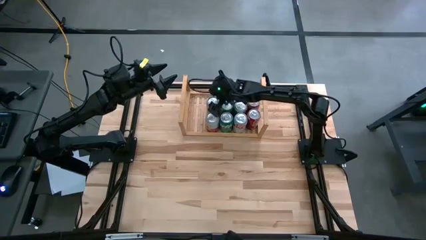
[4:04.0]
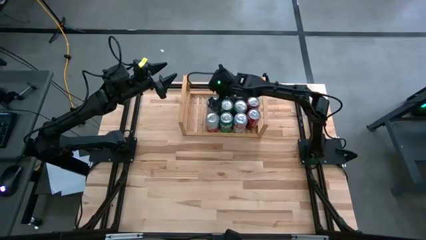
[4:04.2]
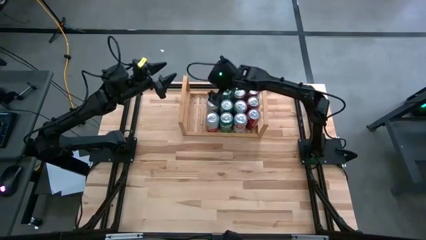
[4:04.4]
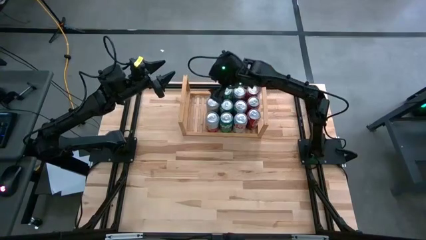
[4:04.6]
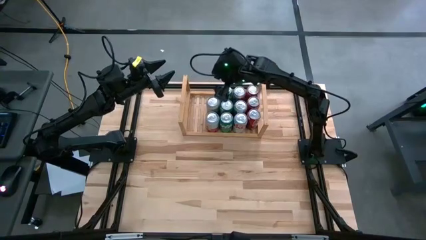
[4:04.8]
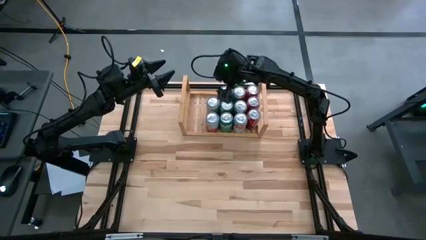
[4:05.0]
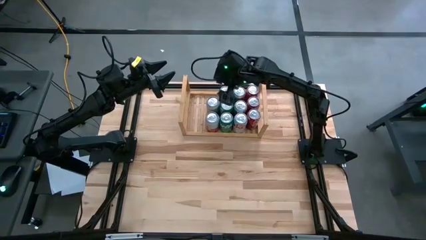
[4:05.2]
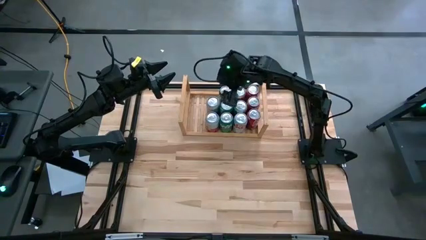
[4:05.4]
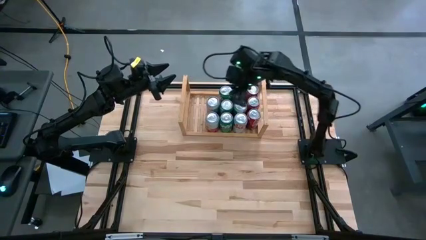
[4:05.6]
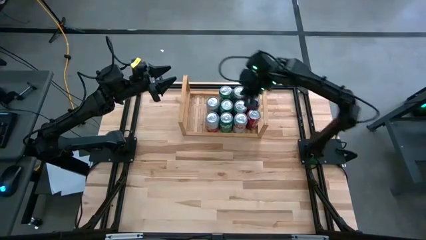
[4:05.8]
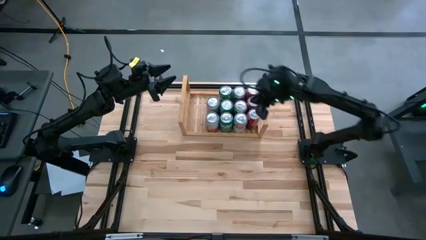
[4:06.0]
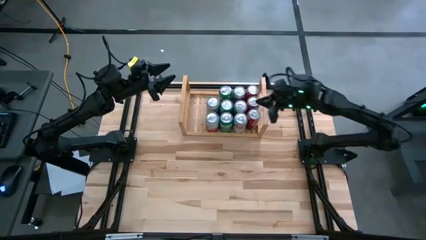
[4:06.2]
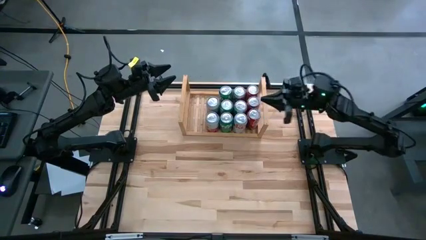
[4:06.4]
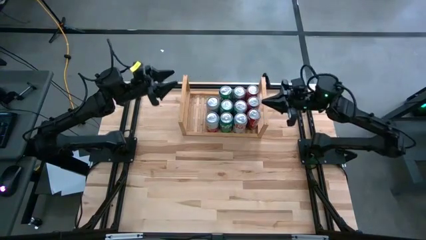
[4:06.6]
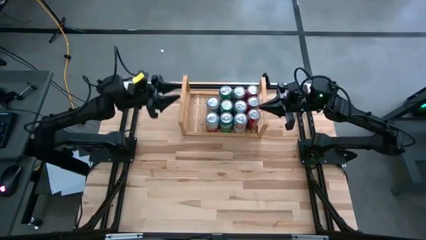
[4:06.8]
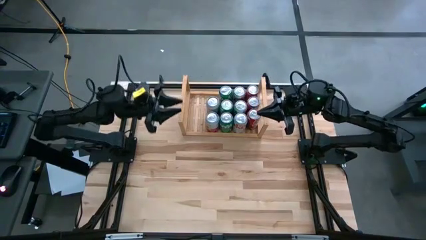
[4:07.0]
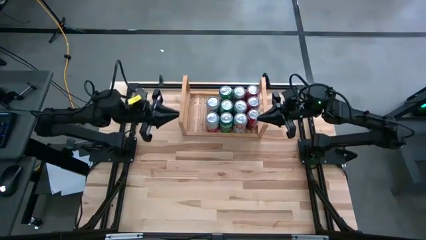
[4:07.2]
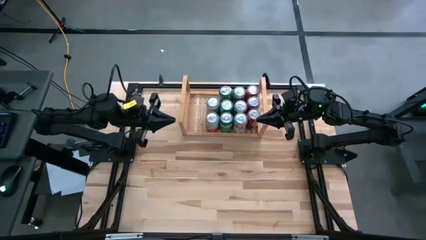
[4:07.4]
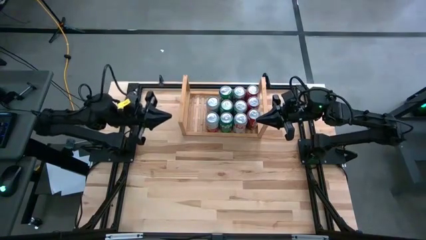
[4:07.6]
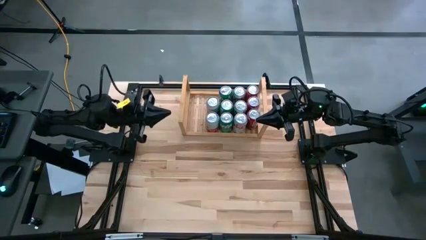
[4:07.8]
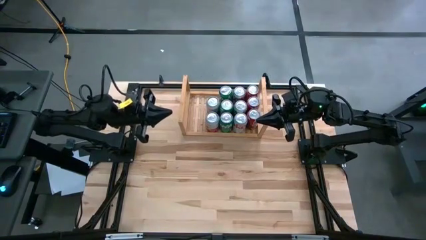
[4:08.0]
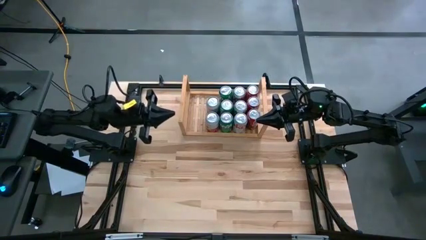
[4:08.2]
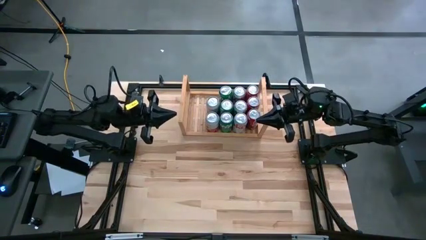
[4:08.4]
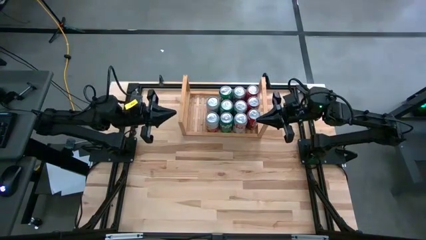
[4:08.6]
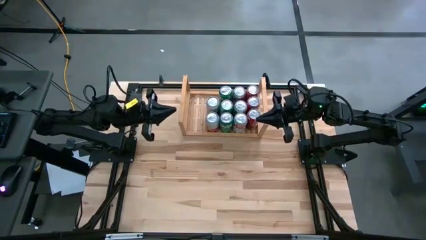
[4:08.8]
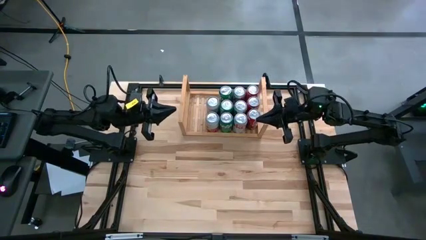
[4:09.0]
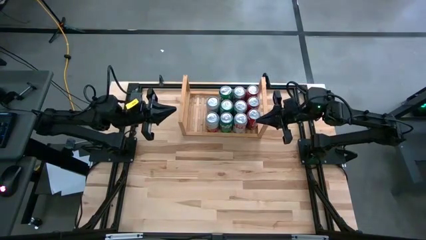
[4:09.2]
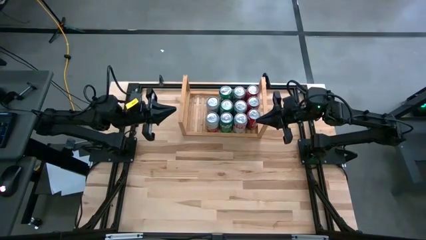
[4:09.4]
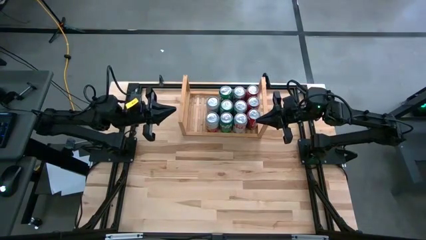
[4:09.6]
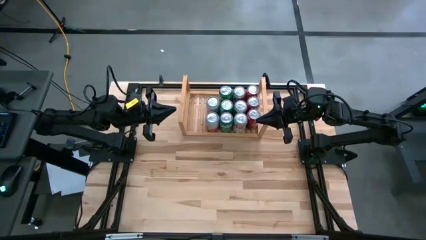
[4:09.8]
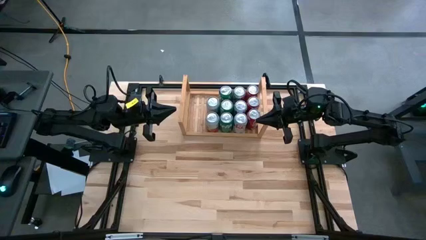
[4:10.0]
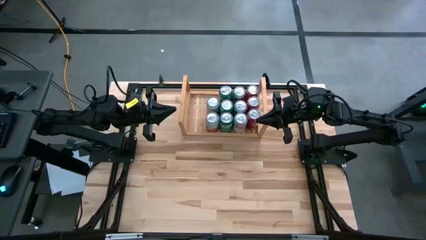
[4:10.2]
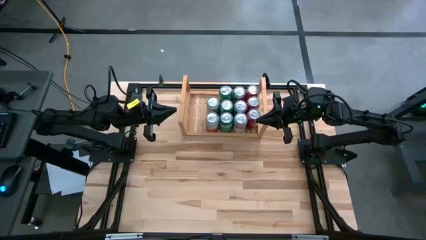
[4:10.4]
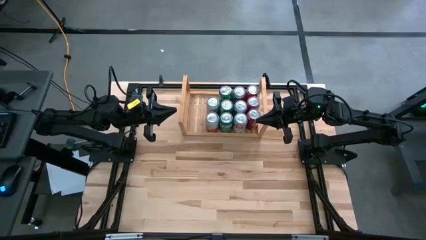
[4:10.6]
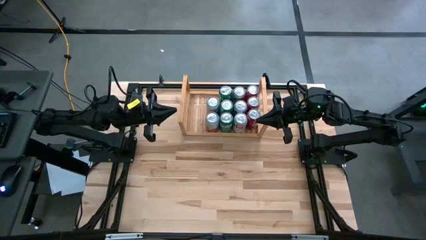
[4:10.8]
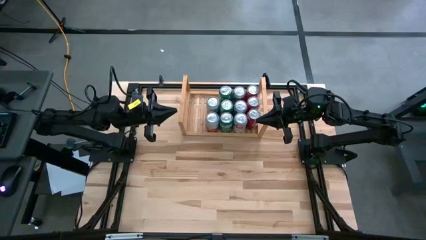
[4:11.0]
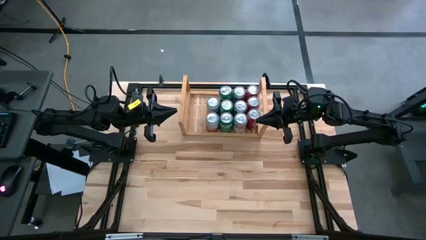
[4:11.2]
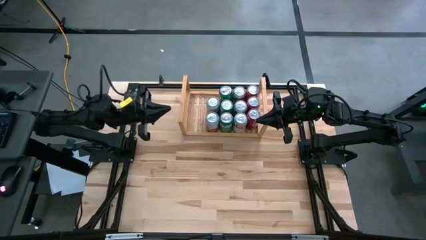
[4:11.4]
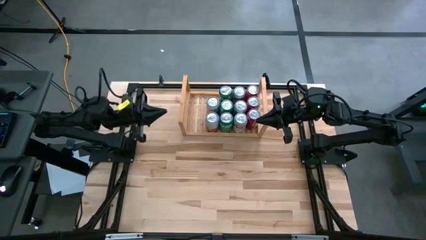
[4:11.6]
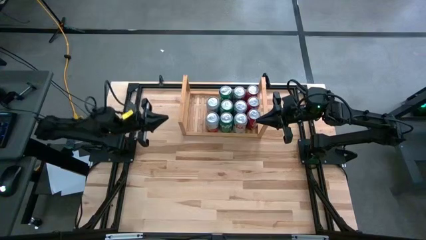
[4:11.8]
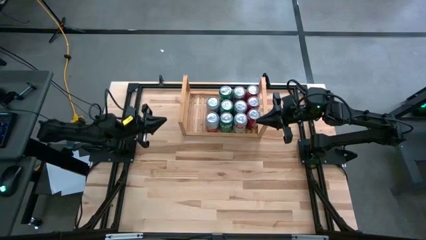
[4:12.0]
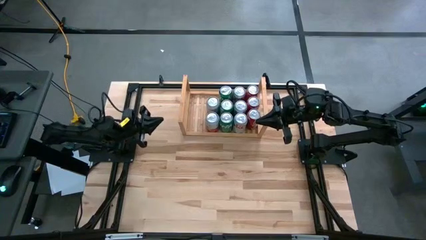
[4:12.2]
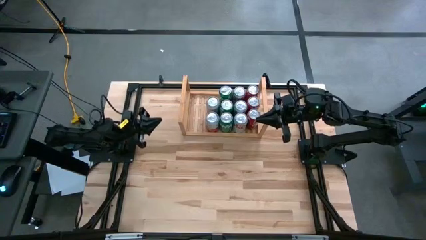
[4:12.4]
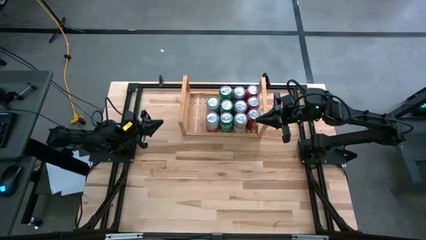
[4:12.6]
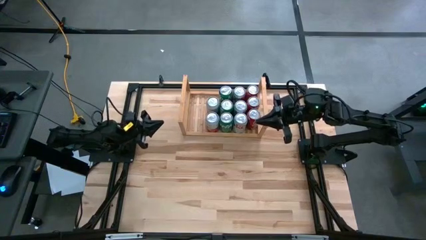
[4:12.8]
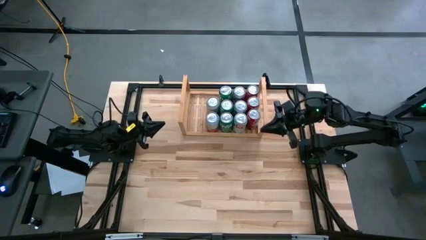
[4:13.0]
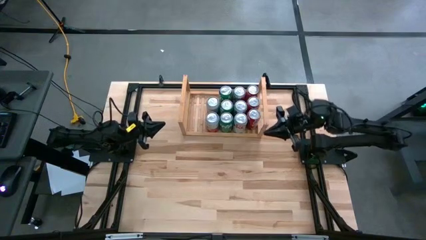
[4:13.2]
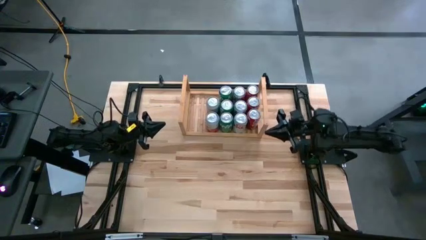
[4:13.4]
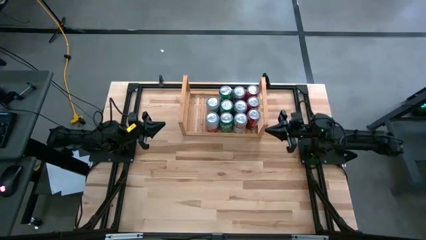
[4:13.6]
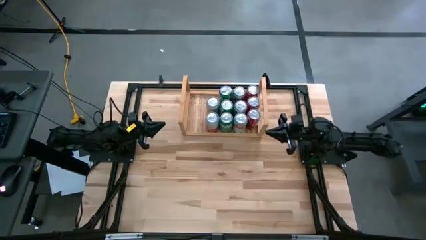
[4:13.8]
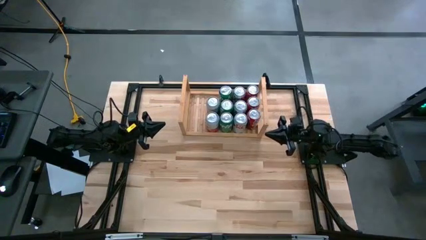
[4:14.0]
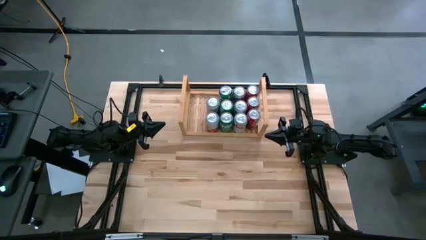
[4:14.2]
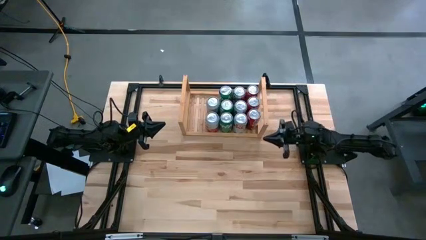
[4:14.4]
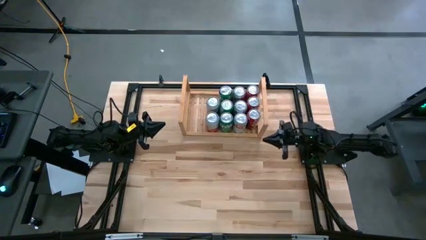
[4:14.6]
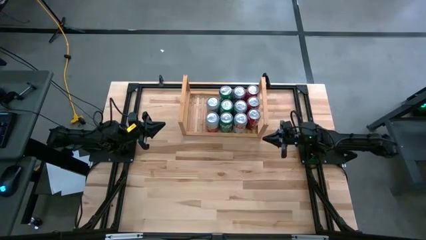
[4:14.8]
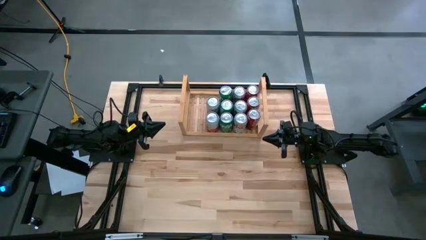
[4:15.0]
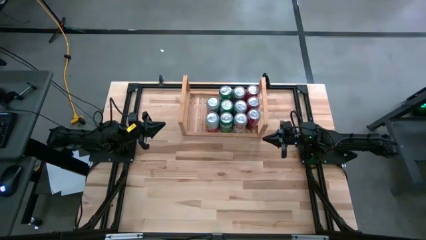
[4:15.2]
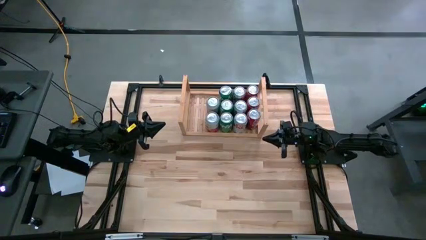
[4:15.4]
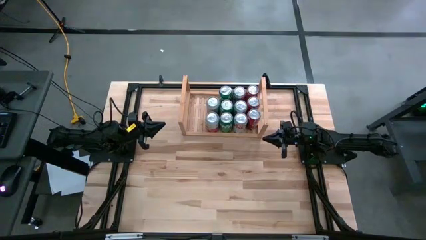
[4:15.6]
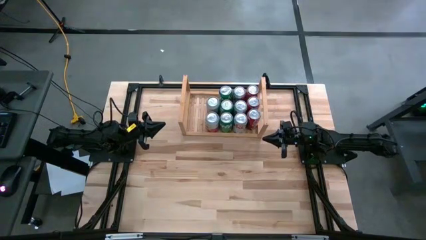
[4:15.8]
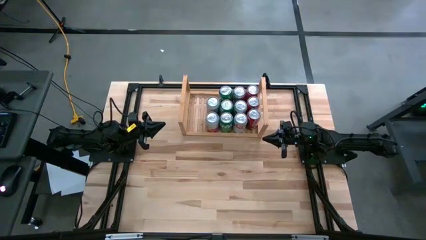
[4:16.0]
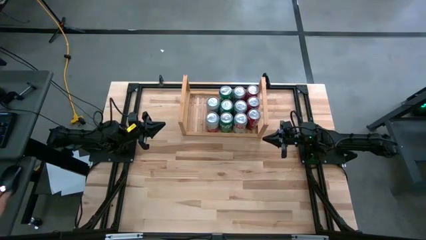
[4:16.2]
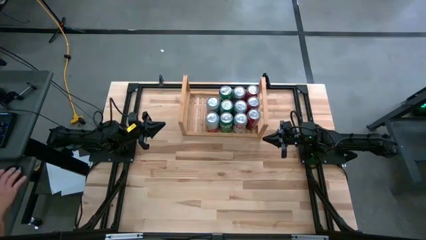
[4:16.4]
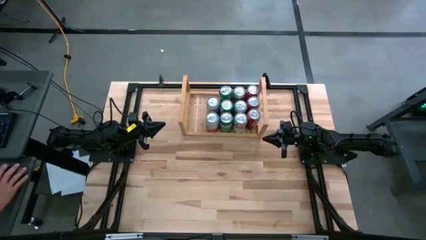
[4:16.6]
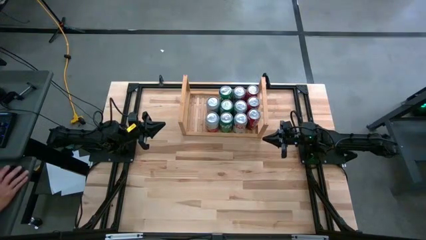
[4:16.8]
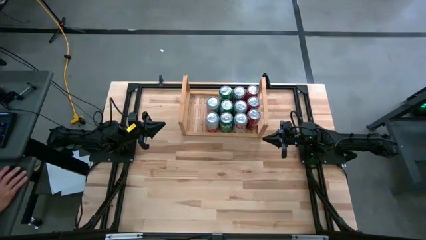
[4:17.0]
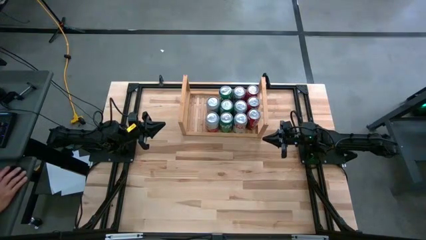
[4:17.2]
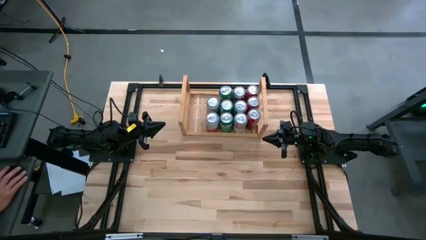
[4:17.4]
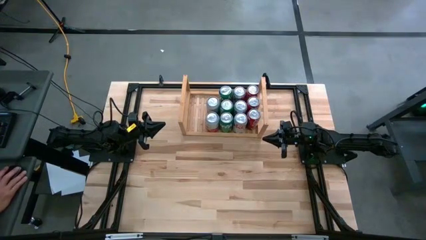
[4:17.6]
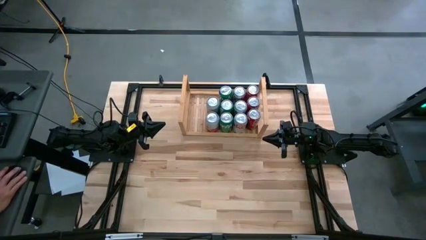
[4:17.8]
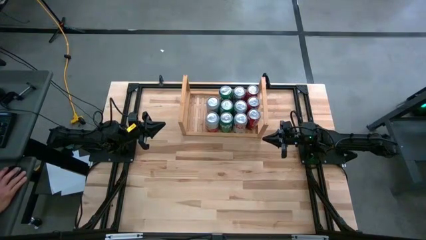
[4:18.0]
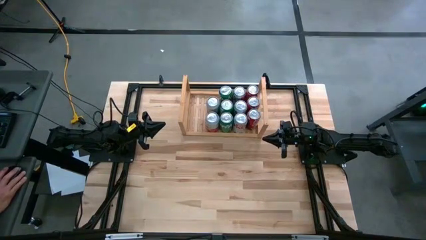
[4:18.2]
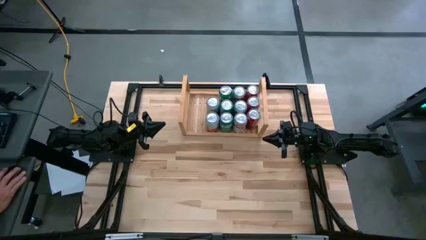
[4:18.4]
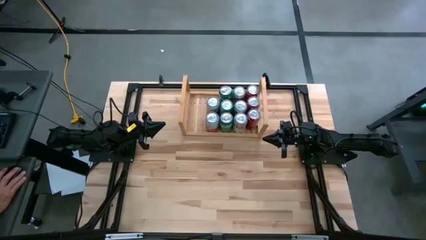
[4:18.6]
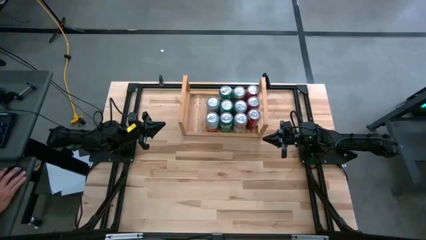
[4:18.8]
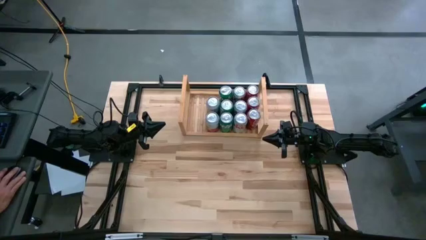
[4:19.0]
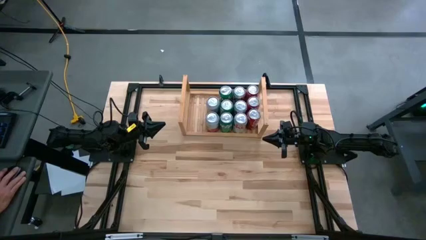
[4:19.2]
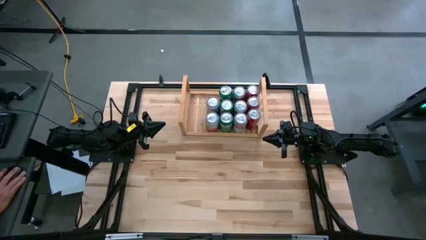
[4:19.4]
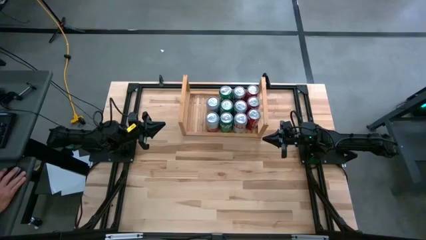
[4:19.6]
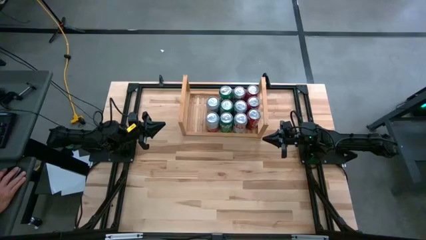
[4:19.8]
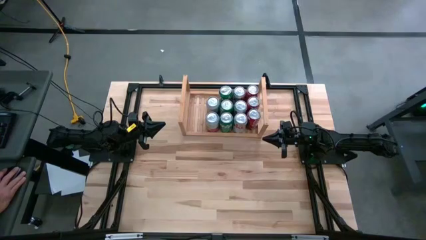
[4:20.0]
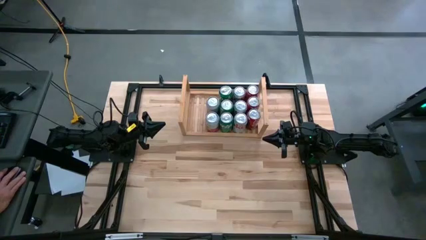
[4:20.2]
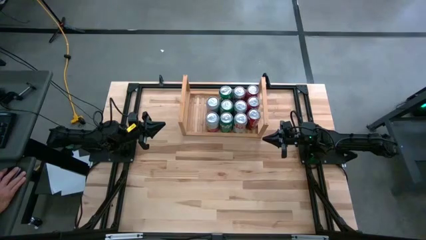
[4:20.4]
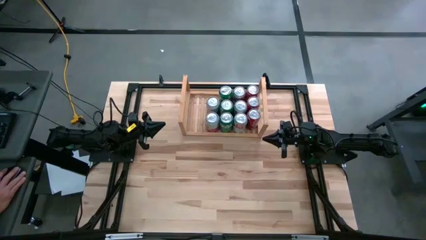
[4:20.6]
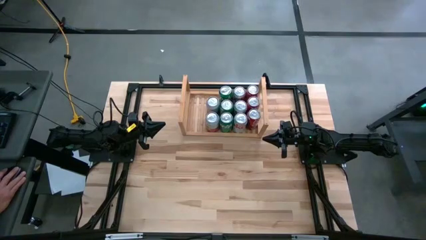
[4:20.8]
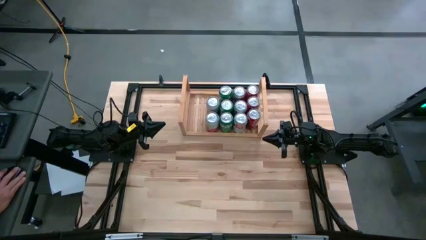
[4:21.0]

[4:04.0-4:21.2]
Task: Place canned beverage on shelf
Return to Home Position
